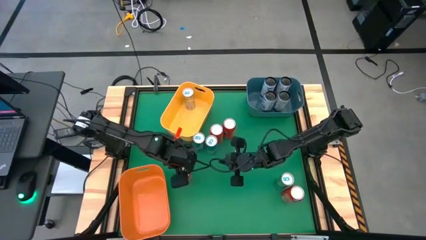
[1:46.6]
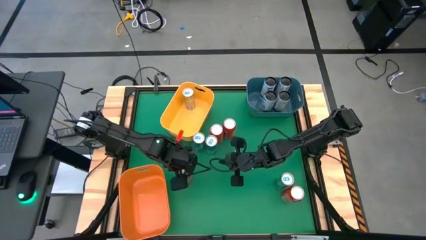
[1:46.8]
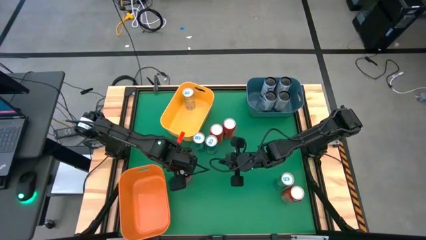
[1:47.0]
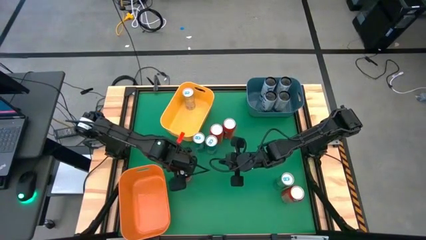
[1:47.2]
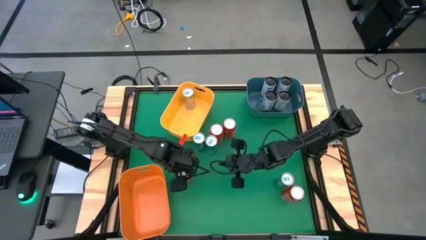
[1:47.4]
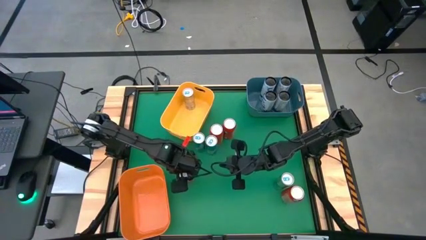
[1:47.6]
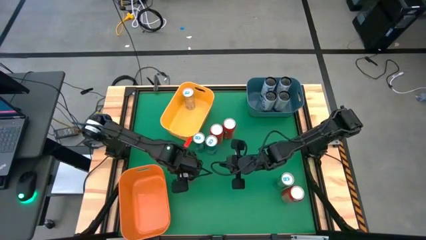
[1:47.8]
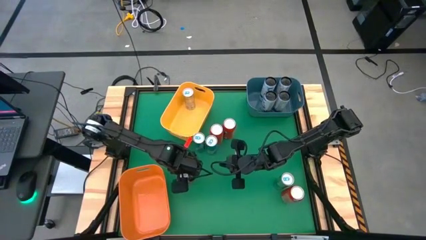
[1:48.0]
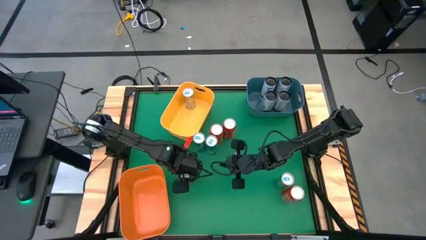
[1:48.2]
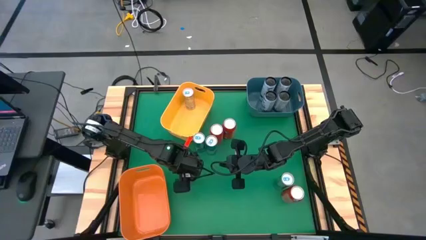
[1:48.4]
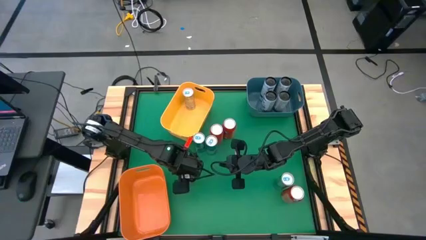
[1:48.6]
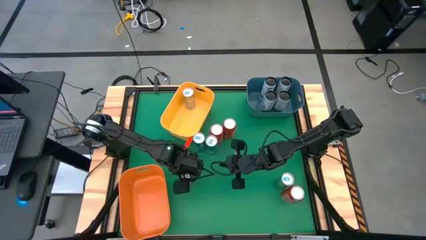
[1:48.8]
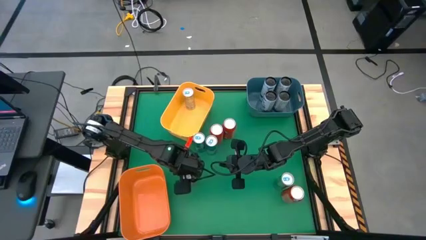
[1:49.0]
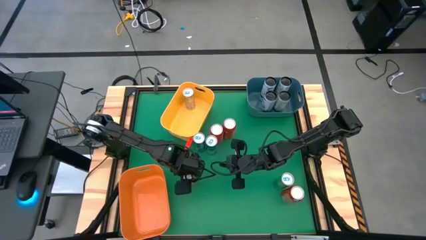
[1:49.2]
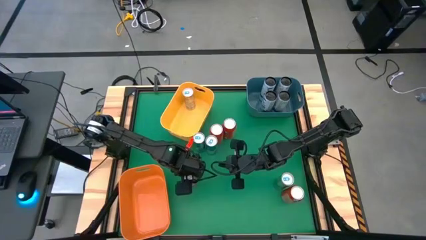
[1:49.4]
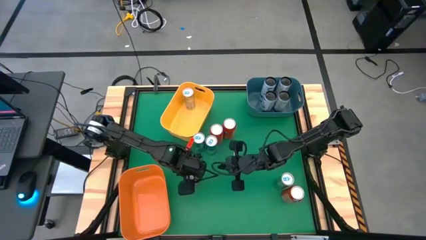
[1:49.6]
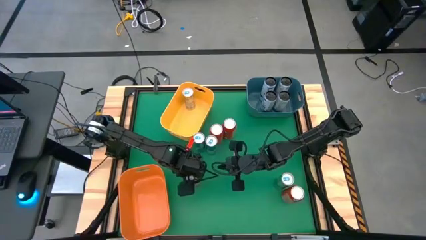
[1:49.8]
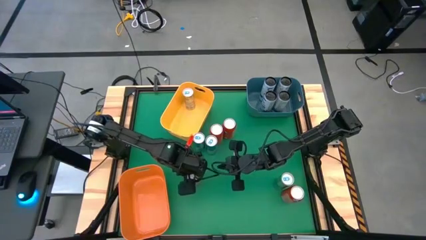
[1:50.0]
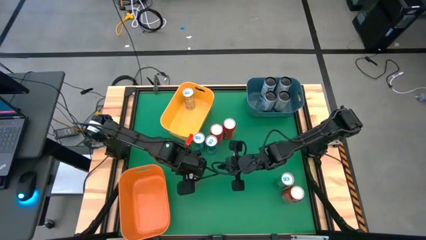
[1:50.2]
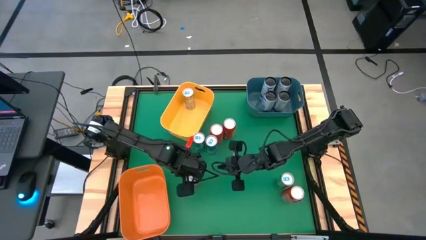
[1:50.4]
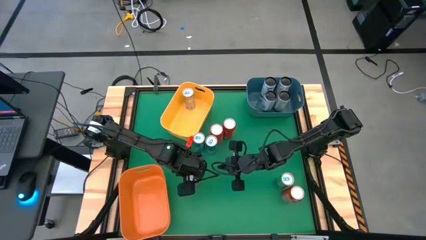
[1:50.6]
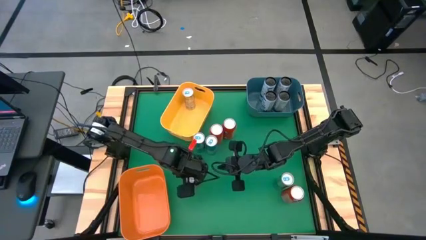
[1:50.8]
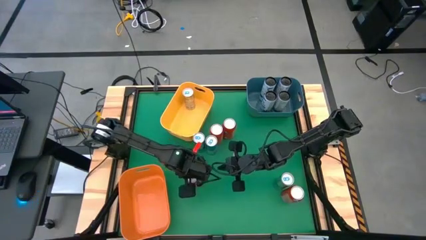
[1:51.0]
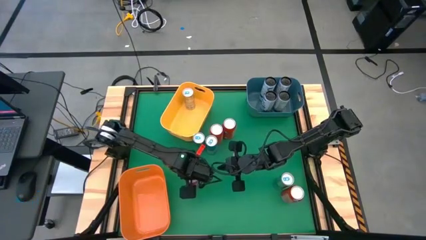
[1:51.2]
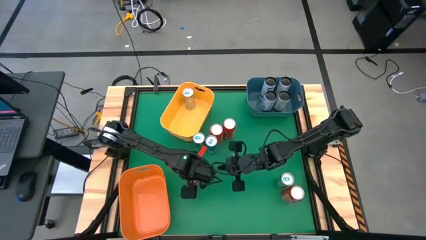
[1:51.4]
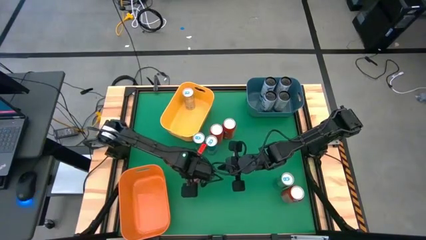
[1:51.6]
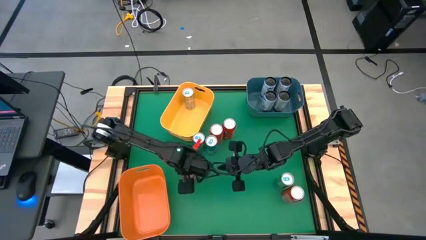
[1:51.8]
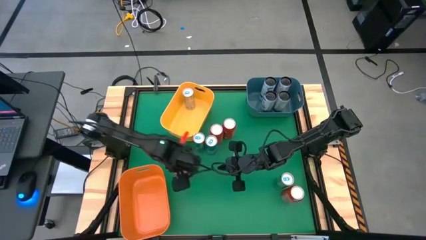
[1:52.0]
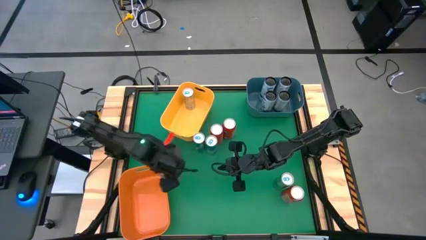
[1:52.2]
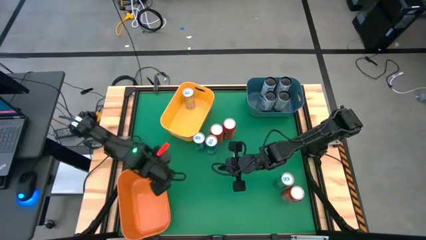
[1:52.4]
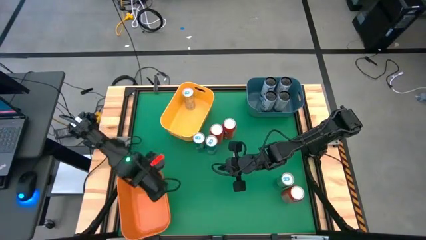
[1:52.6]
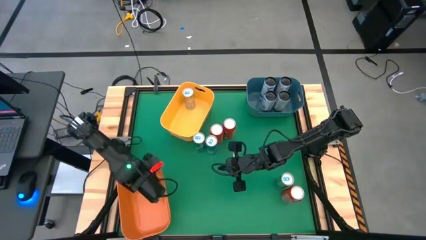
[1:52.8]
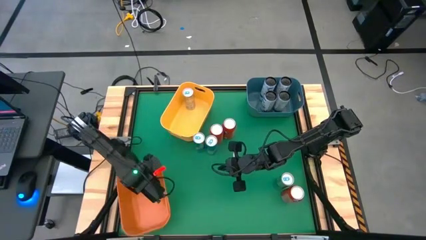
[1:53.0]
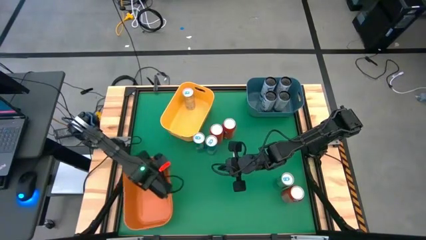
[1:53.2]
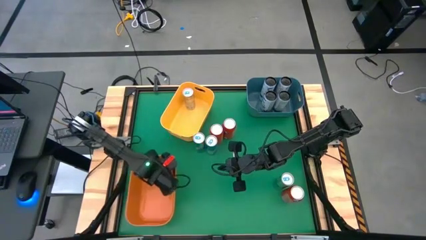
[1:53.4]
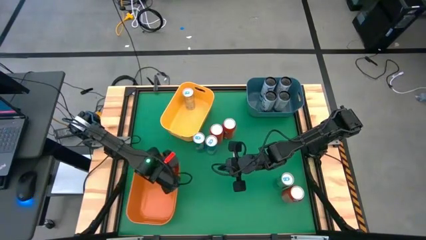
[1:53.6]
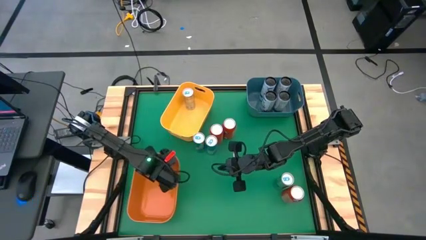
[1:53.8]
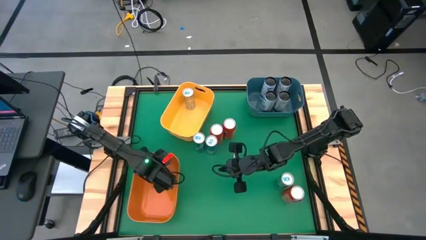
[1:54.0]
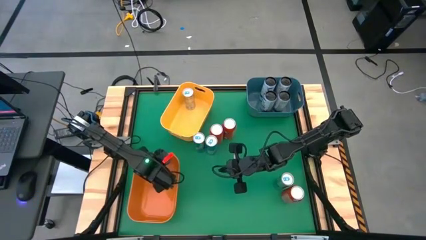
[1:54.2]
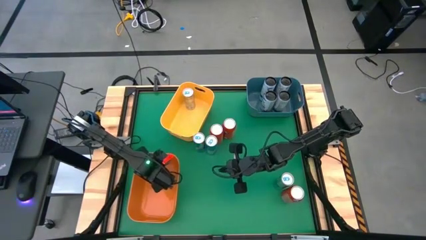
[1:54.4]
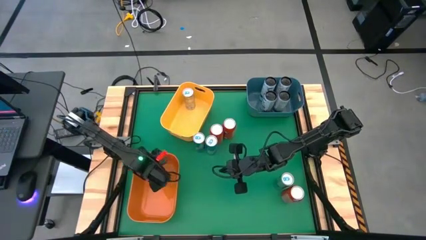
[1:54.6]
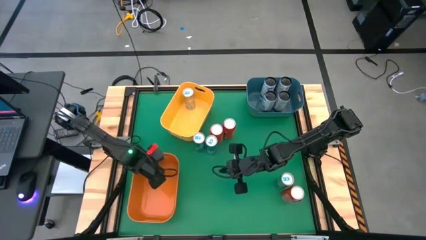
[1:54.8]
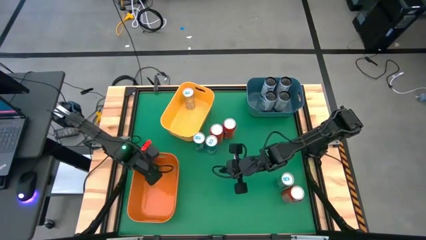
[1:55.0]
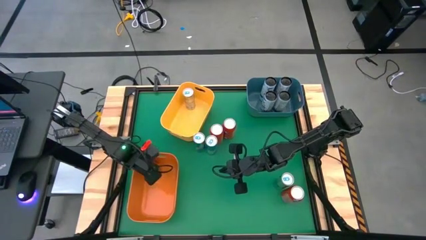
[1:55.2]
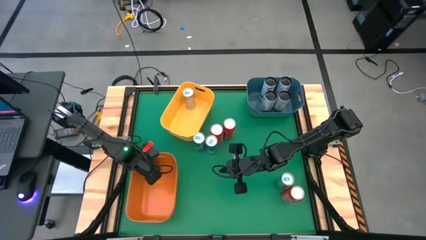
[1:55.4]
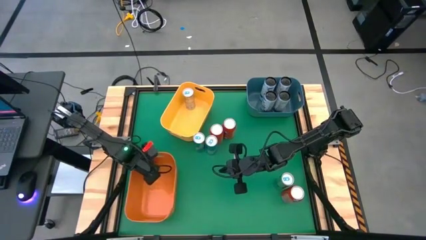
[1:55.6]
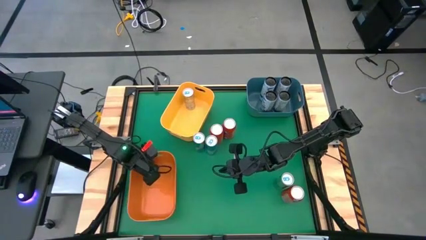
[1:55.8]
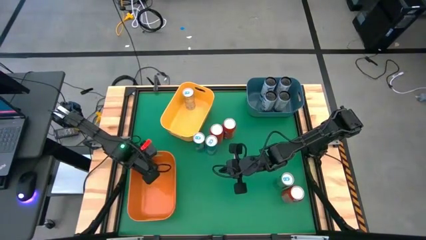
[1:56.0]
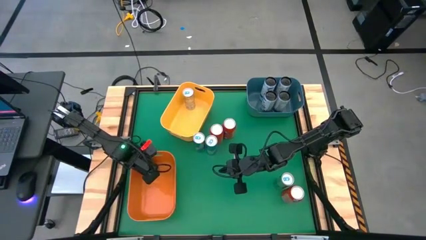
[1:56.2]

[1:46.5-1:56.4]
Task: Sort soda cans
Put the orange soda can into the orange bin

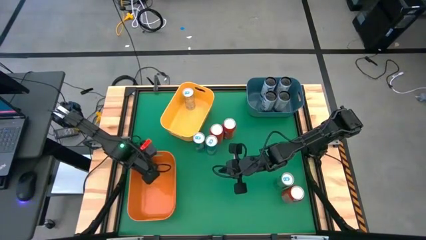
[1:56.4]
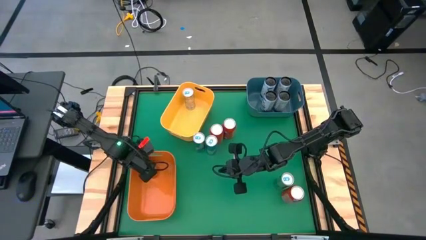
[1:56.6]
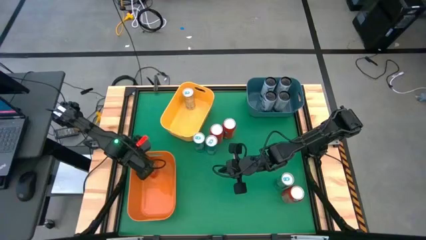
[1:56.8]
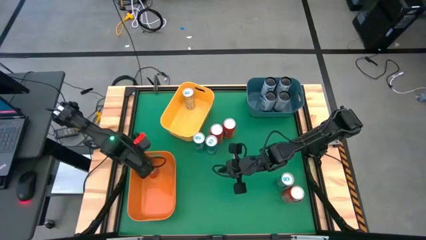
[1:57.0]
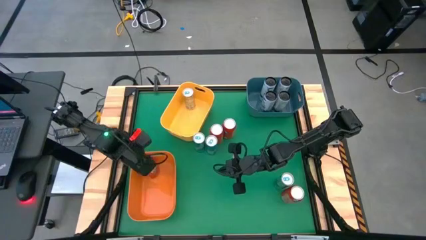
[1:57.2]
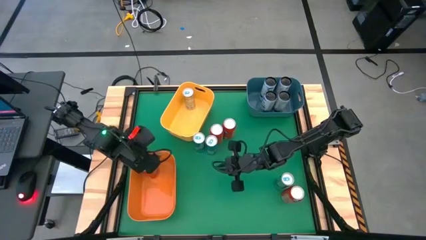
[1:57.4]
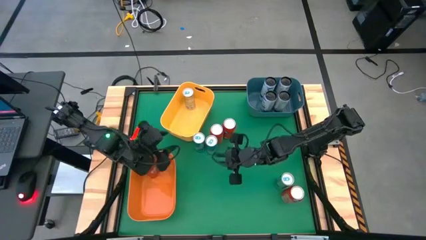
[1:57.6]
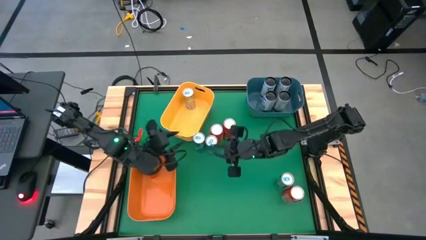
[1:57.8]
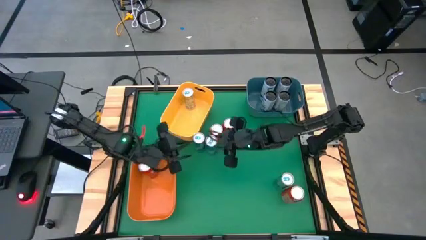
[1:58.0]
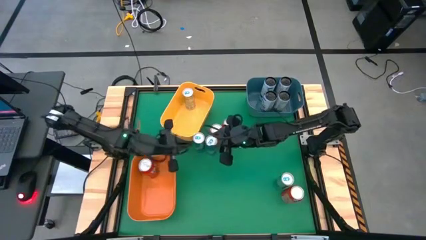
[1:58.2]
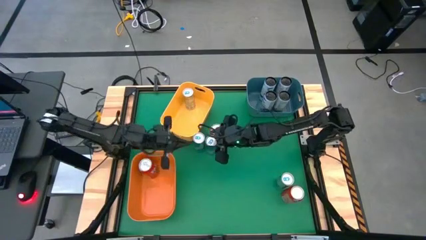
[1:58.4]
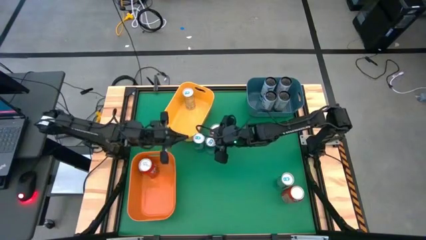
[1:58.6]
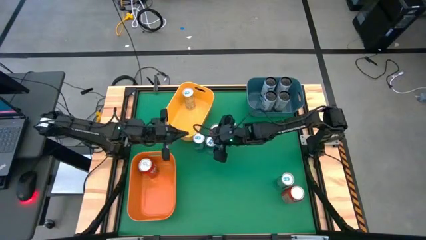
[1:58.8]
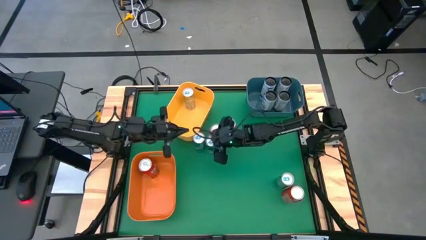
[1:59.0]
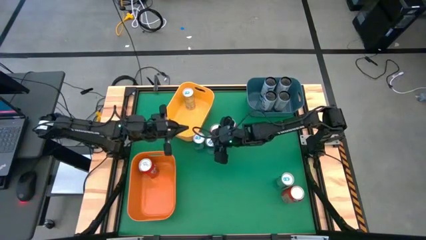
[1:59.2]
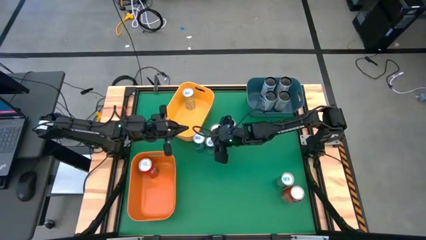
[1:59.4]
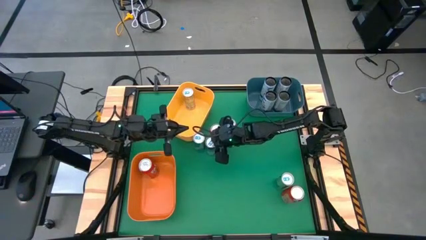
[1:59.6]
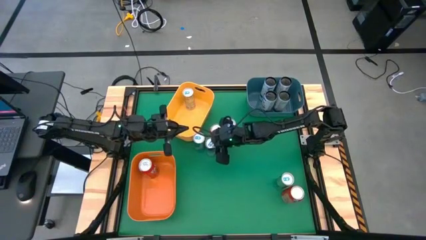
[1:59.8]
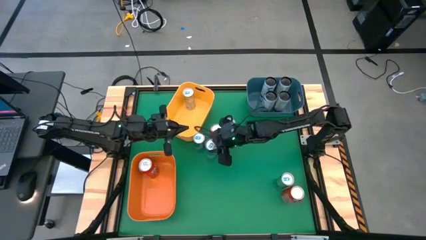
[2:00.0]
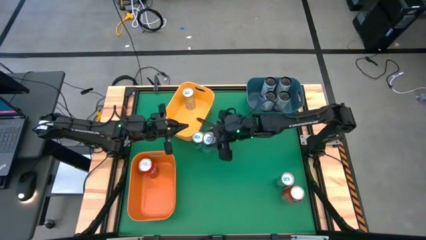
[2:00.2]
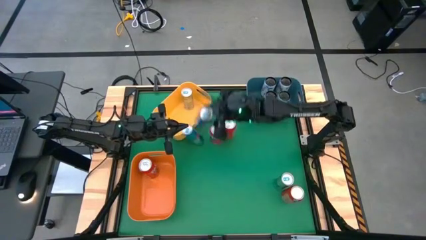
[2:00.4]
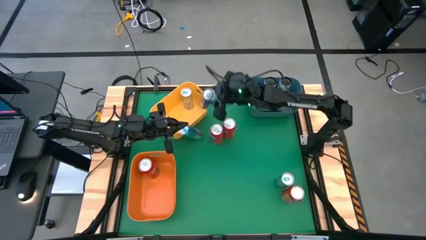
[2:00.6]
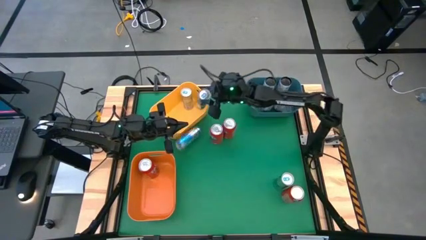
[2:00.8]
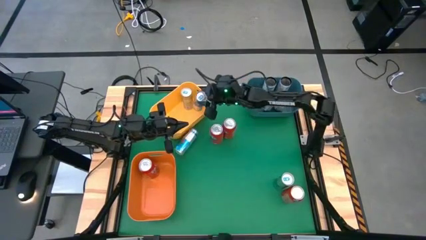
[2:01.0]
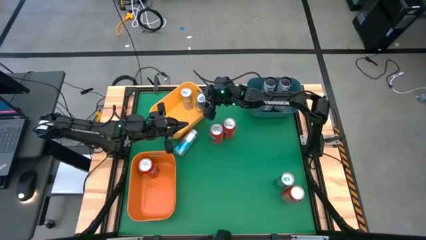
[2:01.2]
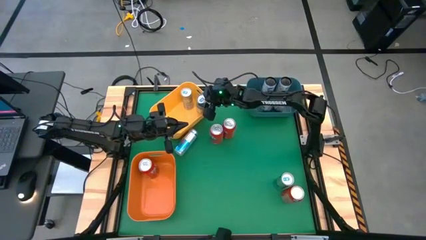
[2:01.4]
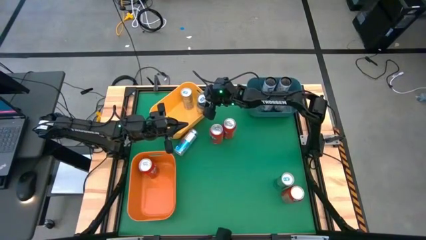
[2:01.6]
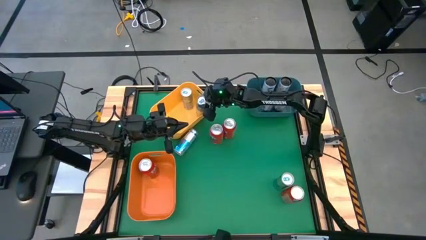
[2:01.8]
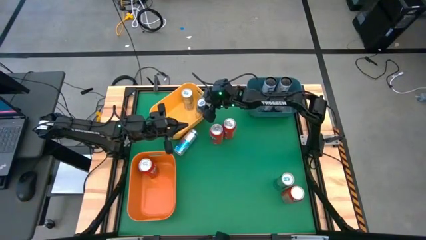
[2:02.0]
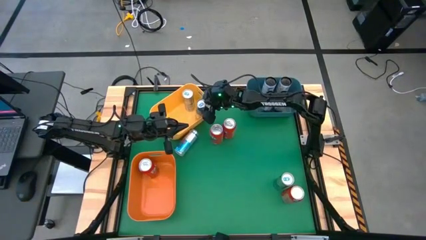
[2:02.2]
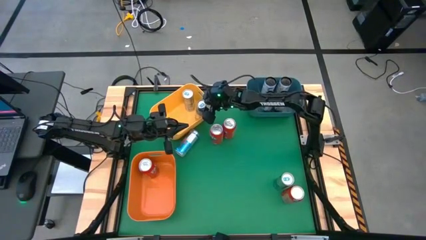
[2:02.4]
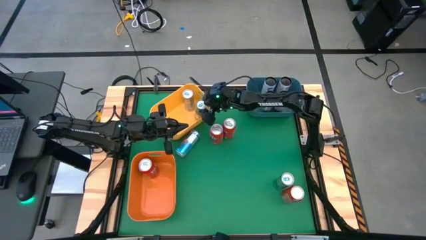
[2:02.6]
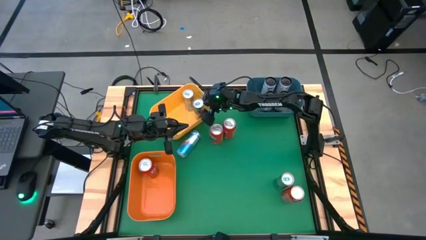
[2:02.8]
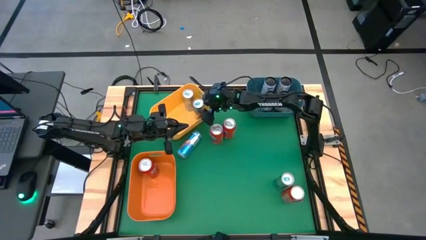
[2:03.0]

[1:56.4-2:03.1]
Put the blue soda can into the yellow bin
